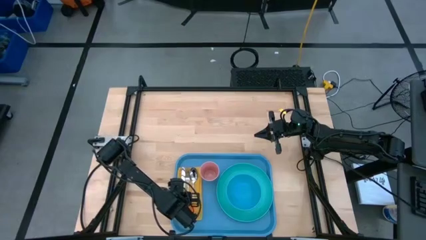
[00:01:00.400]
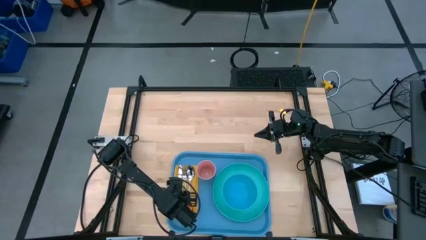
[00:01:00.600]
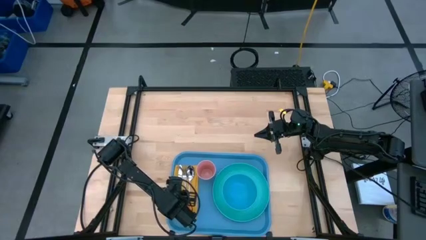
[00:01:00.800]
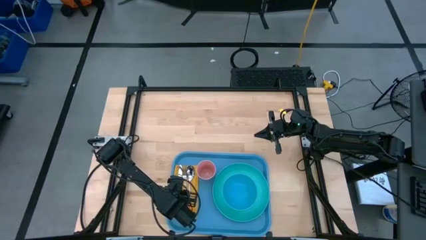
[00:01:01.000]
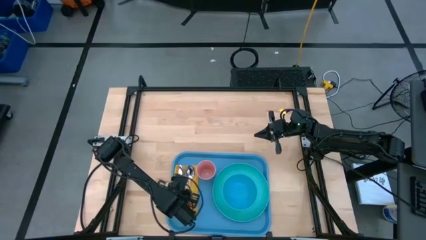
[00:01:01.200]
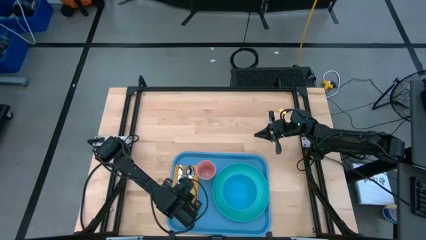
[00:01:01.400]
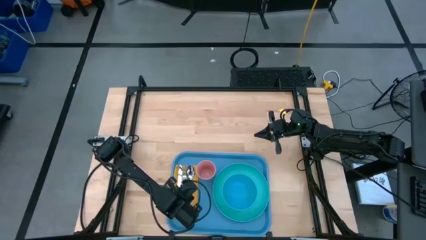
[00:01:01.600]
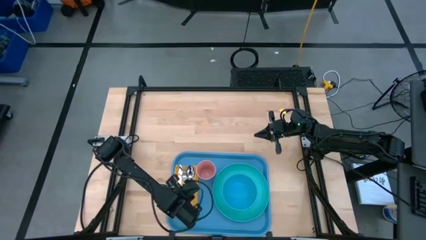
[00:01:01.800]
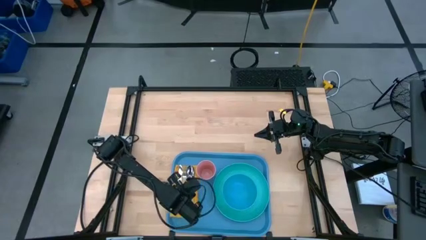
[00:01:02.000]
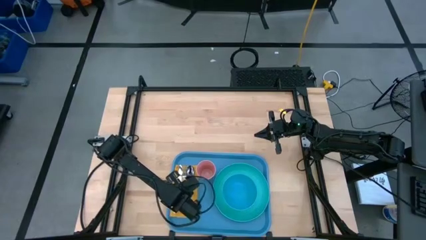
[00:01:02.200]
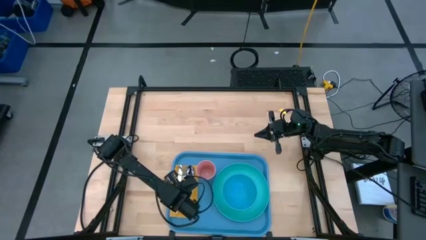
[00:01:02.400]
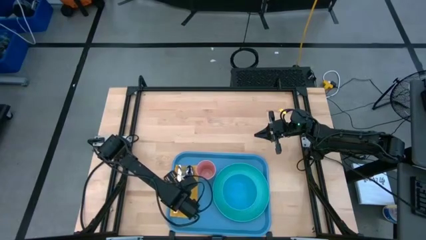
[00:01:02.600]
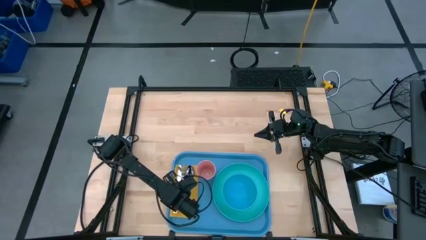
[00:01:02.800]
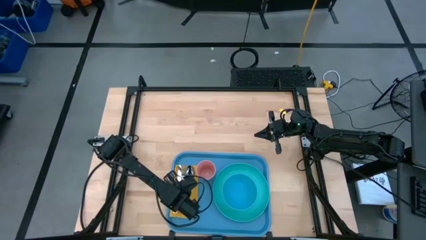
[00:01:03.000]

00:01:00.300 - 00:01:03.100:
Task: Set up tray
Adjust the orange fork

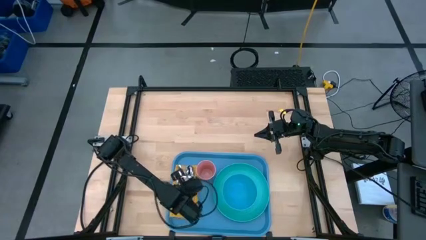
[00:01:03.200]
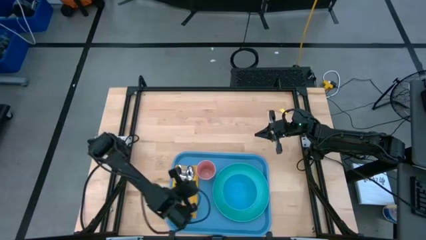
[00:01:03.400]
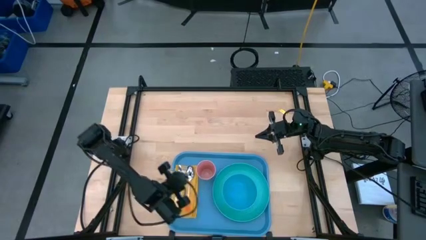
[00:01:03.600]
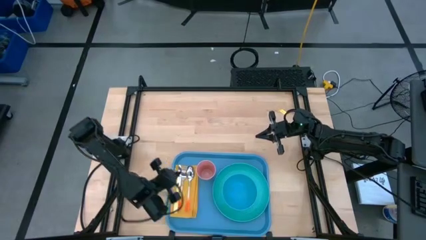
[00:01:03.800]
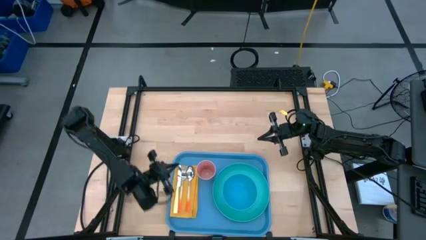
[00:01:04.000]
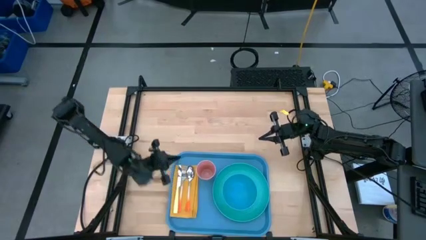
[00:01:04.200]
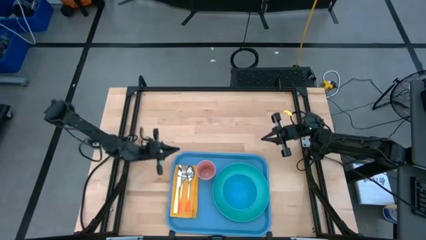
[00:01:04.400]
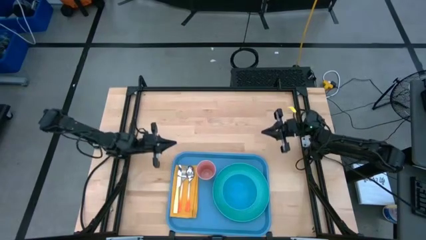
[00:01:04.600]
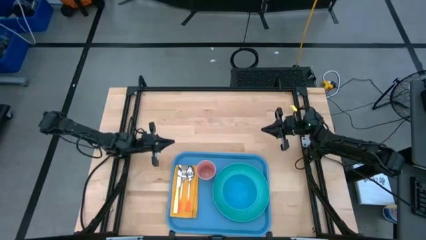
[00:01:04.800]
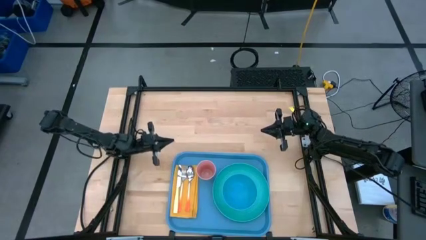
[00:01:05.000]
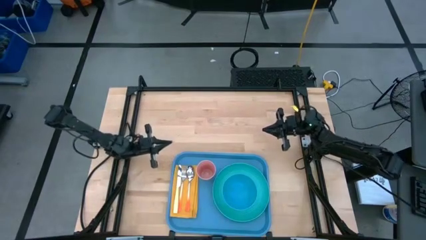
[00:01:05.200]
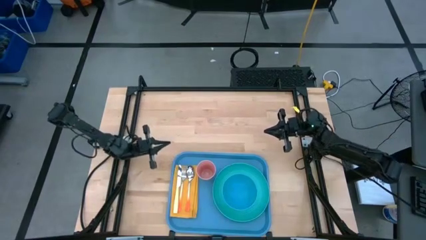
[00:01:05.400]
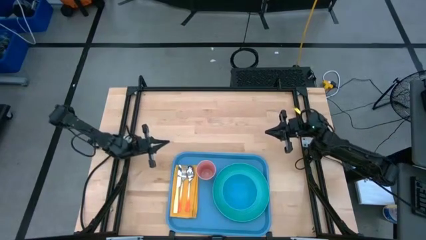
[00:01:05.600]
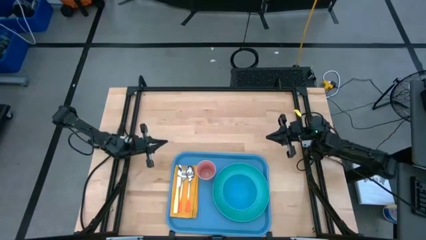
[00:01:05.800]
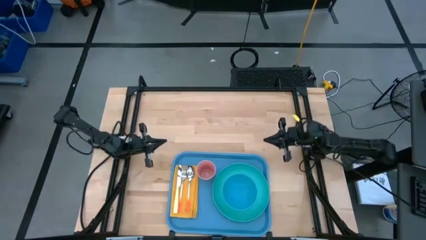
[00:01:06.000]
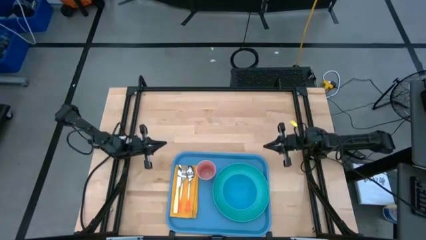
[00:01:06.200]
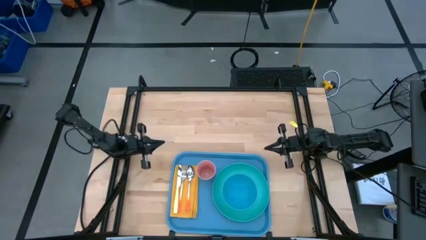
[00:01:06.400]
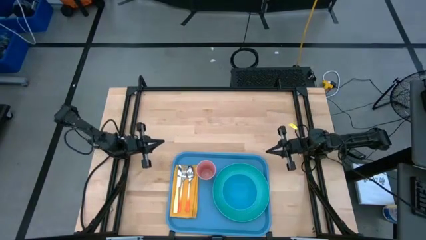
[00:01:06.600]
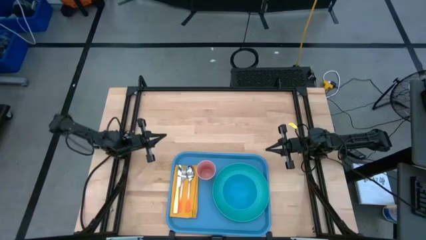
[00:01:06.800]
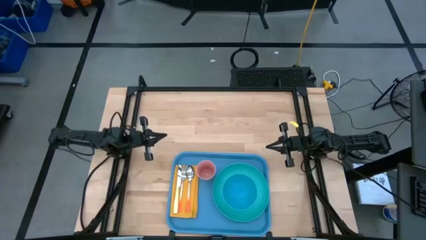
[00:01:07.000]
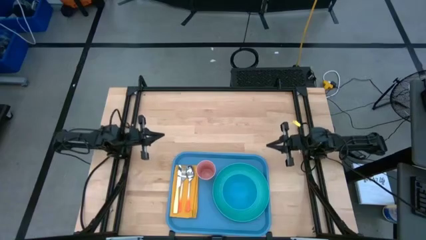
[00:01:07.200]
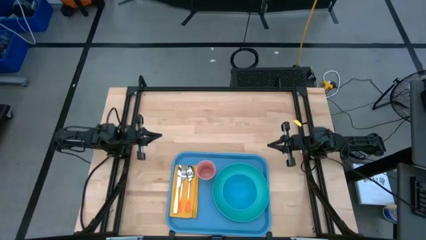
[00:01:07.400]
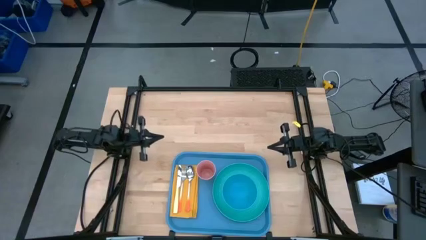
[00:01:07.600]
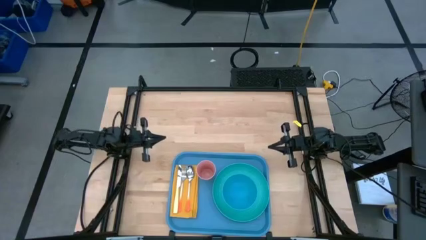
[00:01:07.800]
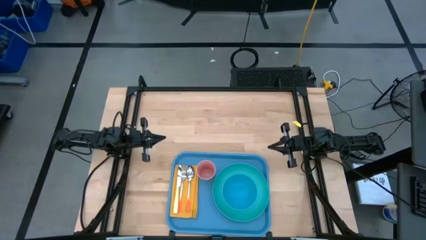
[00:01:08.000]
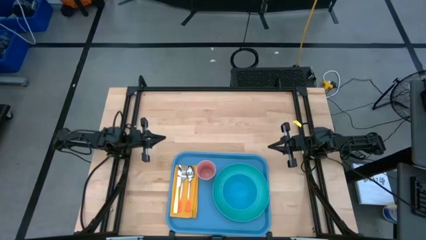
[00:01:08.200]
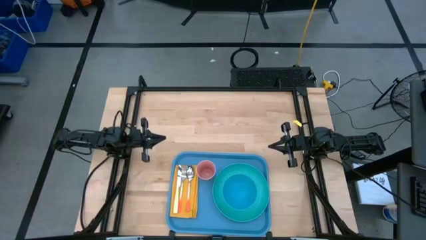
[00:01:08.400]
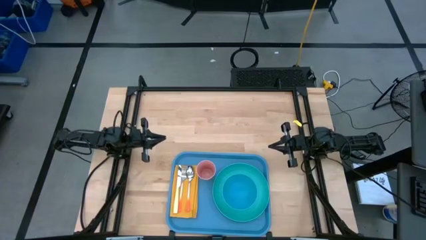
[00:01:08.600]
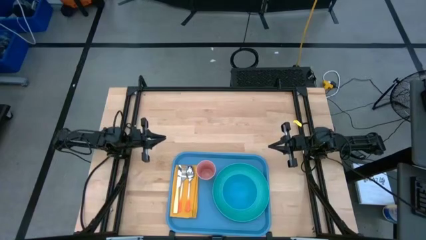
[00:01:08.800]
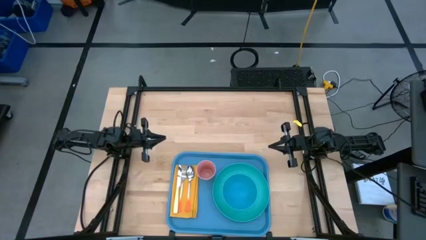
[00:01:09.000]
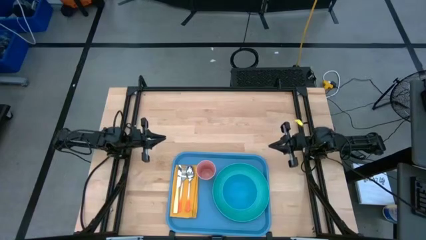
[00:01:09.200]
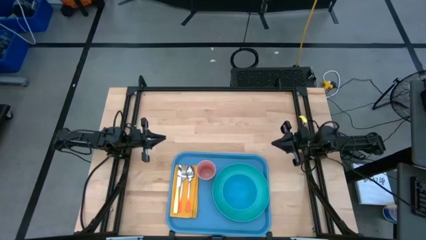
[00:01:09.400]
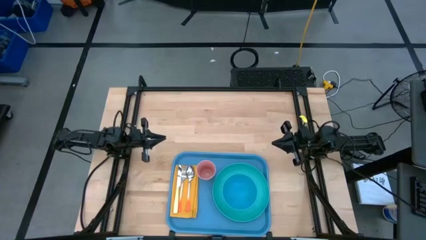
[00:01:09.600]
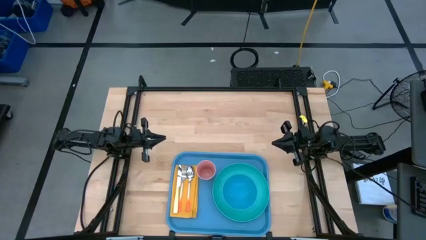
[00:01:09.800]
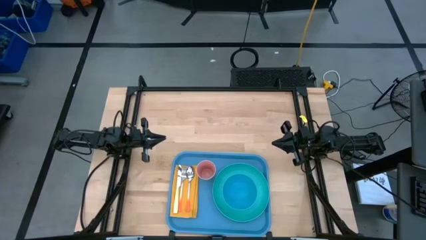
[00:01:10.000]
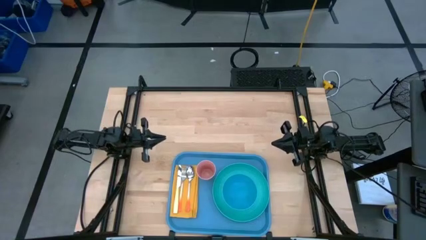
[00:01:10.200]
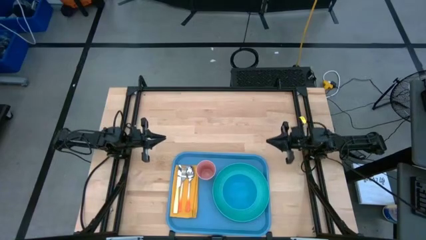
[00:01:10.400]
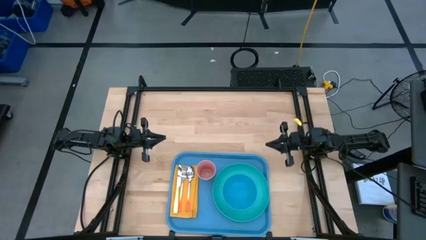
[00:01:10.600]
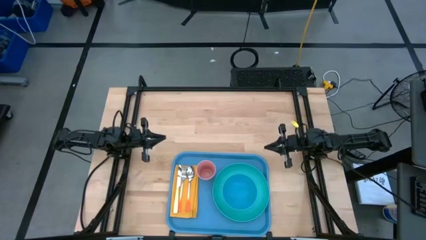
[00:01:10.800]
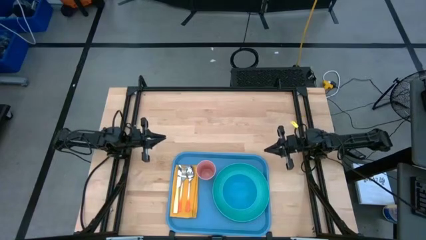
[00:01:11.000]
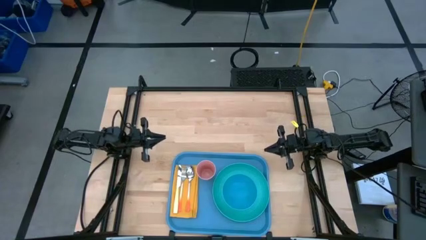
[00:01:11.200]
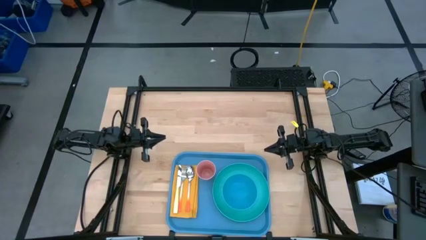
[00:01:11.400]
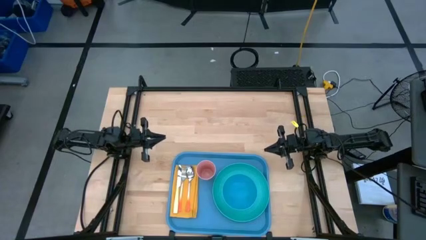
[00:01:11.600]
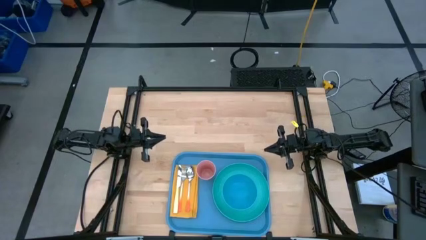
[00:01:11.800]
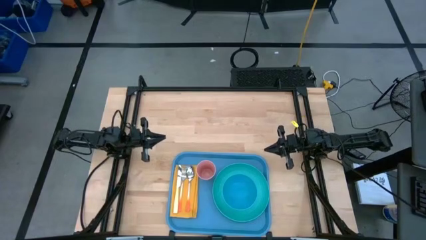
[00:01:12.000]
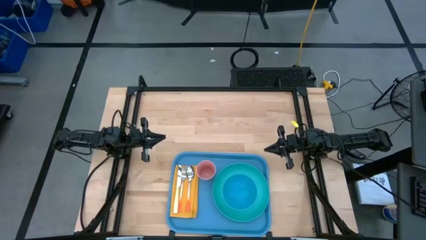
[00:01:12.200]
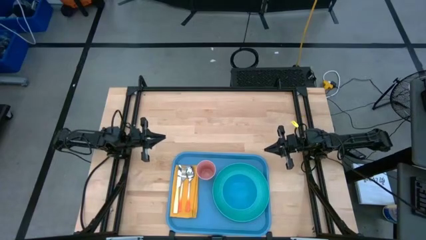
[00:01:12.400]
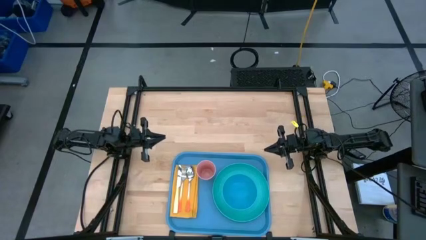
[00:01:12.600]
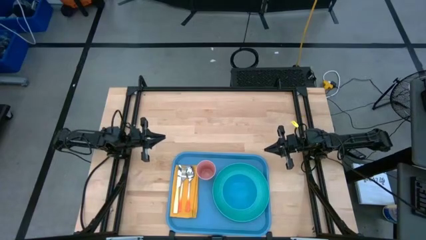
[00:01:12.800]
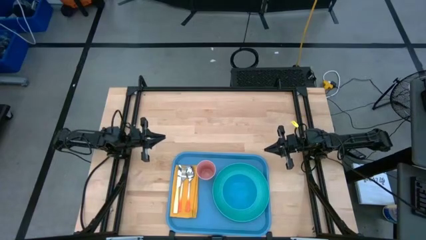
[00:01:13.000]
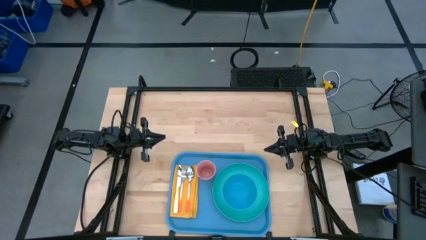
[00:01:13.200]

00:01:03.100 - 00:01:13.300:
Return to Home Position
